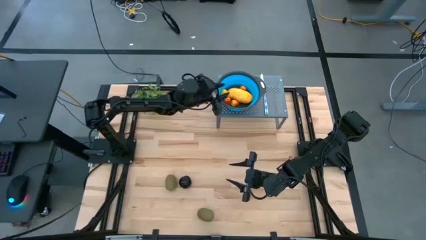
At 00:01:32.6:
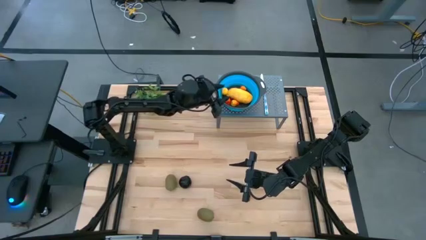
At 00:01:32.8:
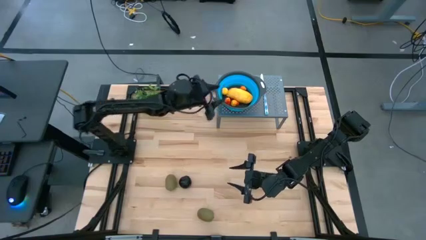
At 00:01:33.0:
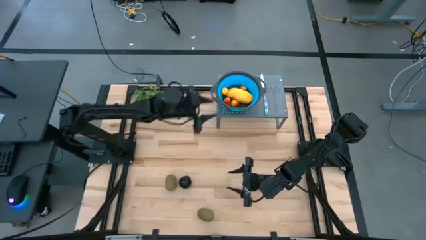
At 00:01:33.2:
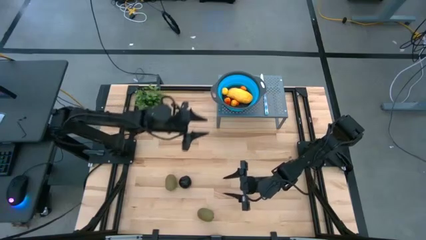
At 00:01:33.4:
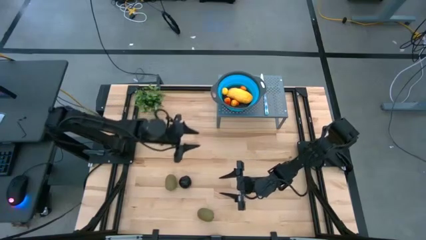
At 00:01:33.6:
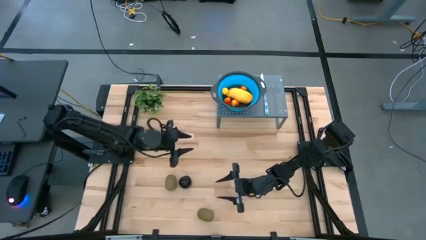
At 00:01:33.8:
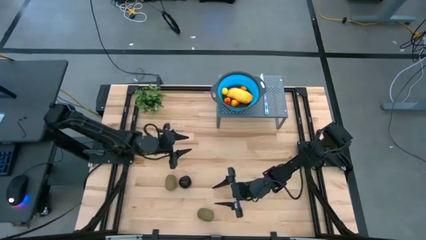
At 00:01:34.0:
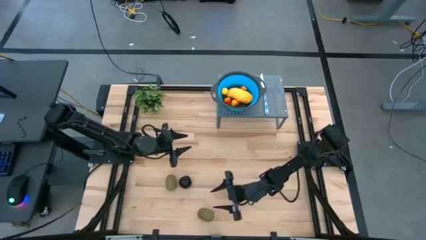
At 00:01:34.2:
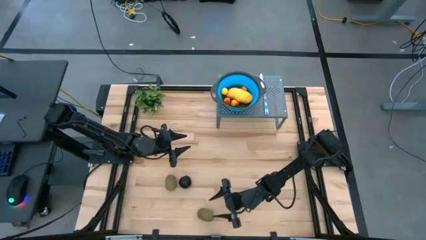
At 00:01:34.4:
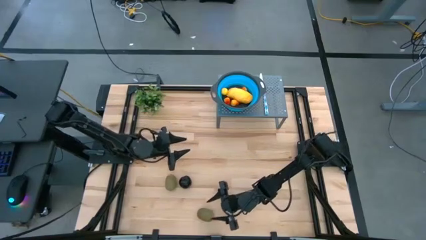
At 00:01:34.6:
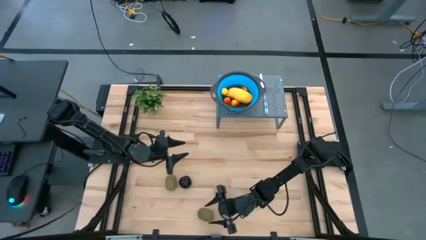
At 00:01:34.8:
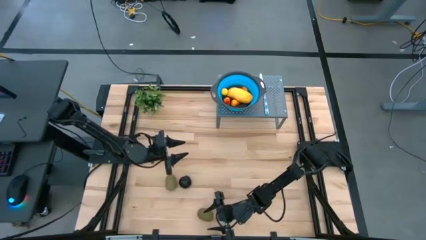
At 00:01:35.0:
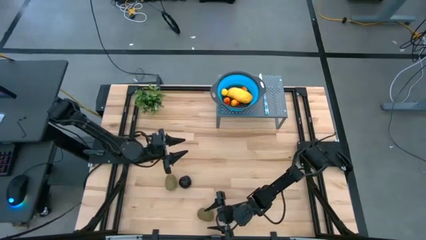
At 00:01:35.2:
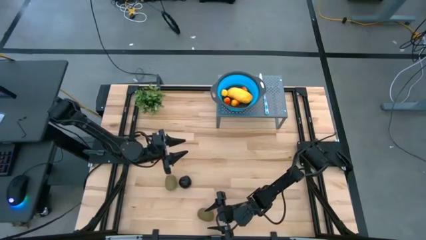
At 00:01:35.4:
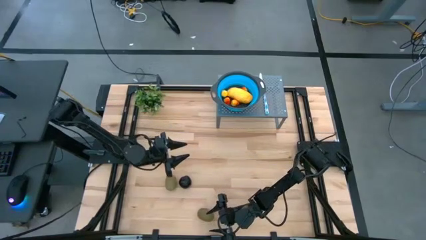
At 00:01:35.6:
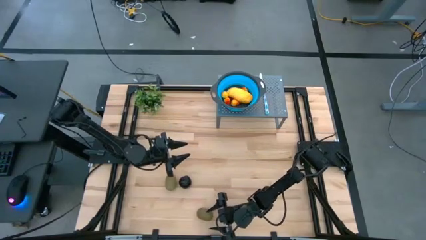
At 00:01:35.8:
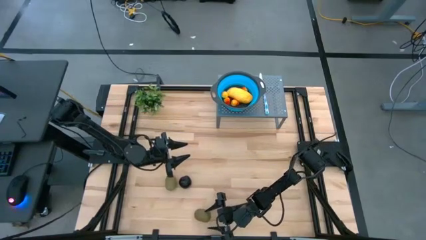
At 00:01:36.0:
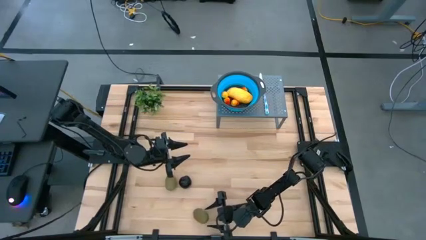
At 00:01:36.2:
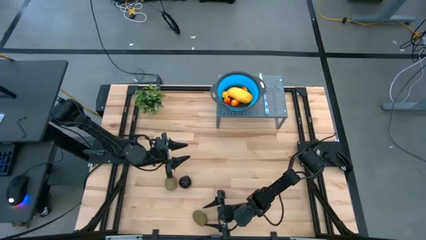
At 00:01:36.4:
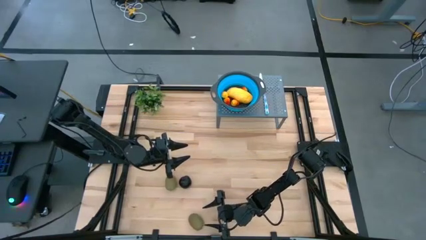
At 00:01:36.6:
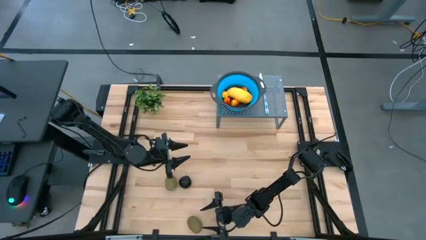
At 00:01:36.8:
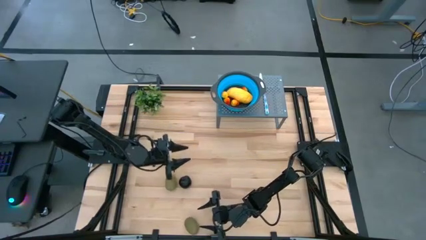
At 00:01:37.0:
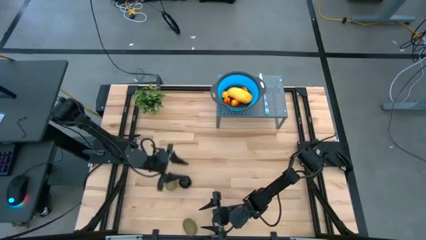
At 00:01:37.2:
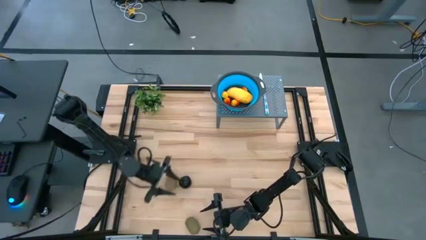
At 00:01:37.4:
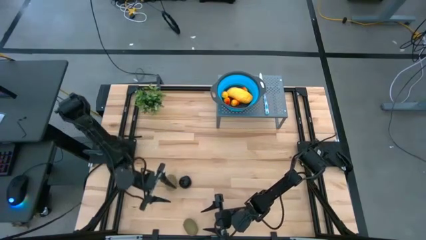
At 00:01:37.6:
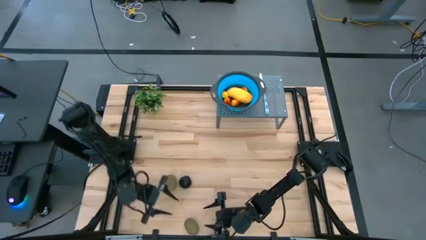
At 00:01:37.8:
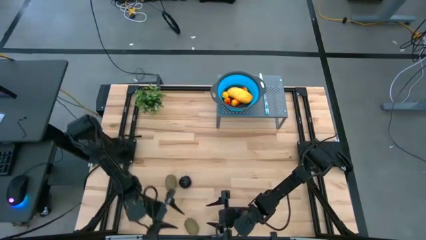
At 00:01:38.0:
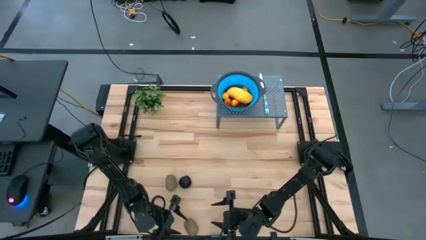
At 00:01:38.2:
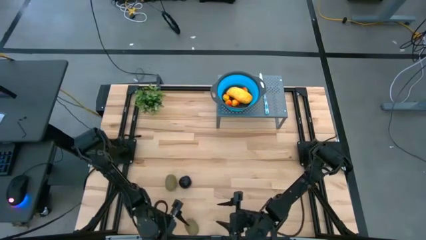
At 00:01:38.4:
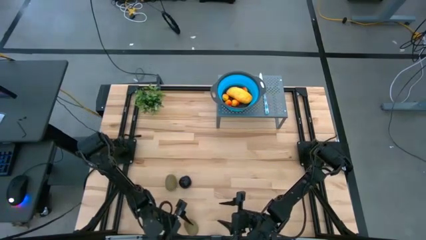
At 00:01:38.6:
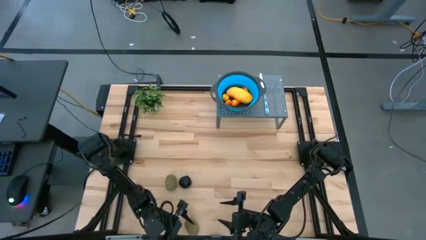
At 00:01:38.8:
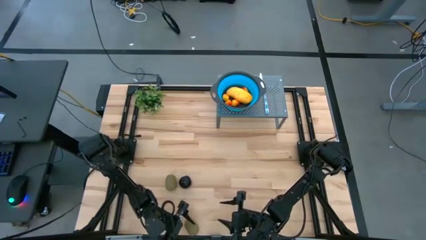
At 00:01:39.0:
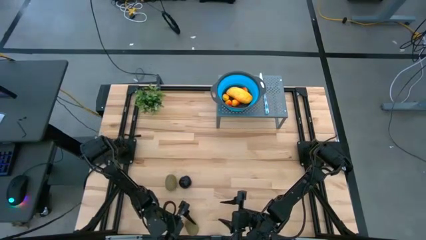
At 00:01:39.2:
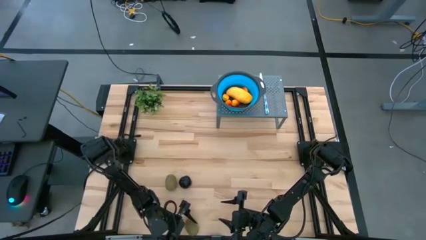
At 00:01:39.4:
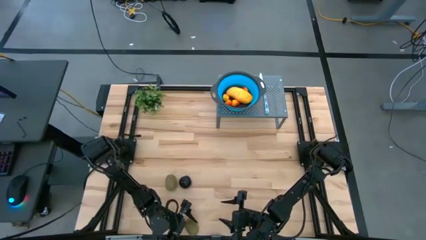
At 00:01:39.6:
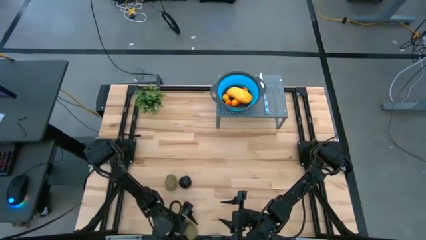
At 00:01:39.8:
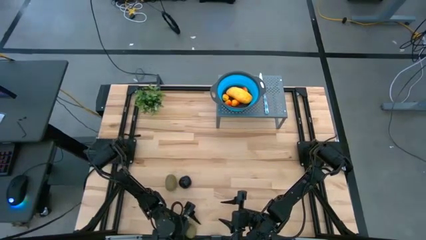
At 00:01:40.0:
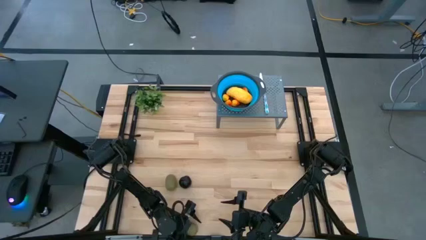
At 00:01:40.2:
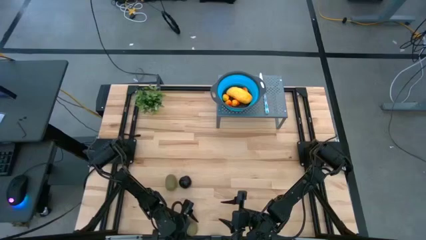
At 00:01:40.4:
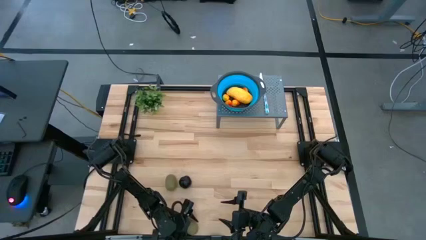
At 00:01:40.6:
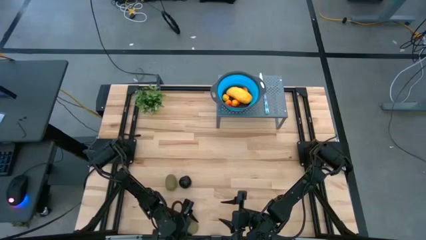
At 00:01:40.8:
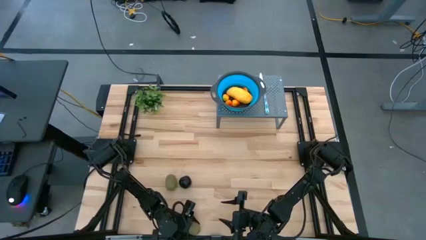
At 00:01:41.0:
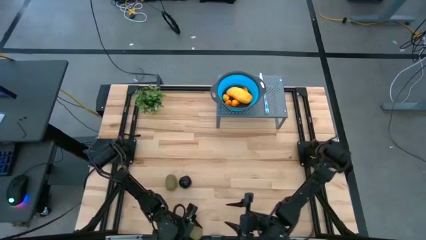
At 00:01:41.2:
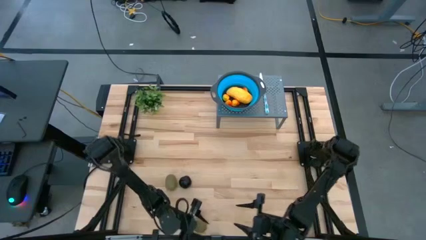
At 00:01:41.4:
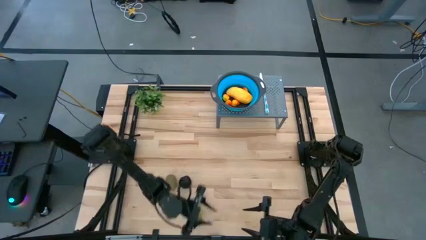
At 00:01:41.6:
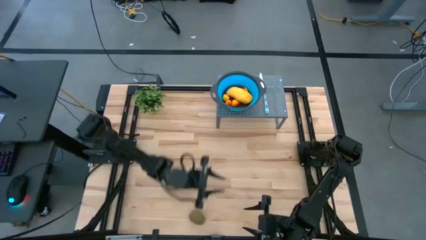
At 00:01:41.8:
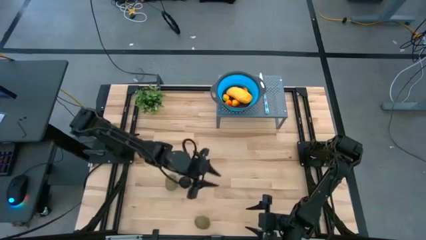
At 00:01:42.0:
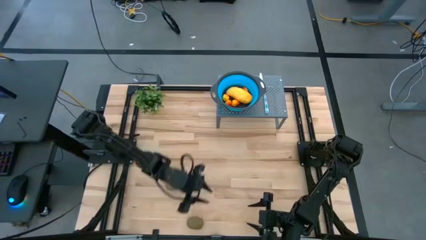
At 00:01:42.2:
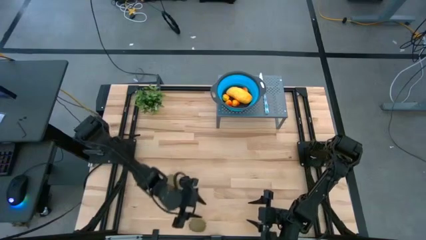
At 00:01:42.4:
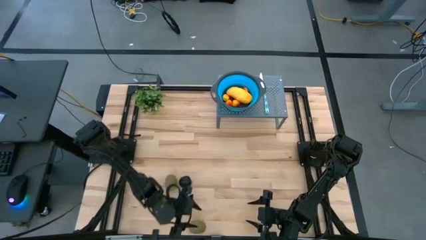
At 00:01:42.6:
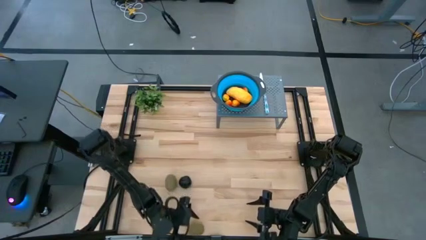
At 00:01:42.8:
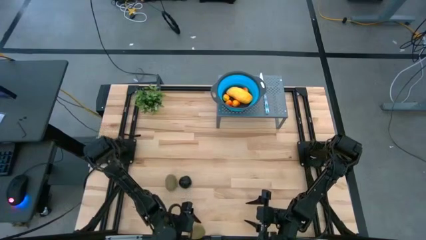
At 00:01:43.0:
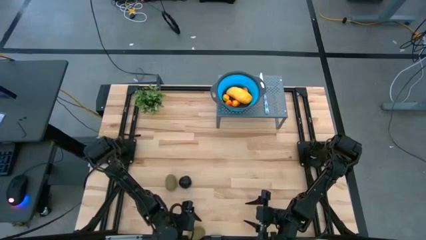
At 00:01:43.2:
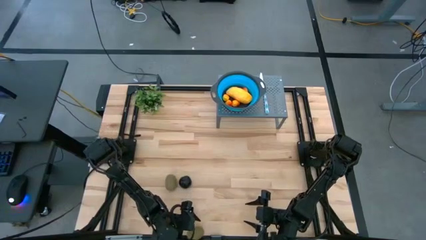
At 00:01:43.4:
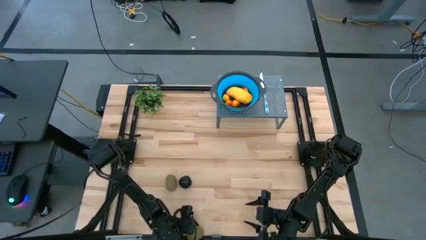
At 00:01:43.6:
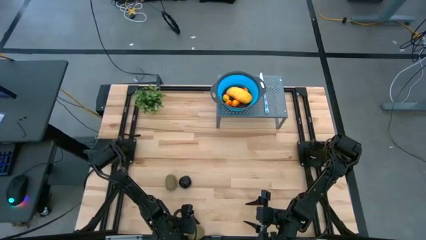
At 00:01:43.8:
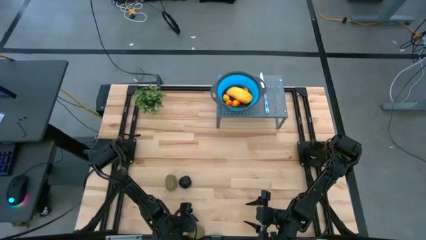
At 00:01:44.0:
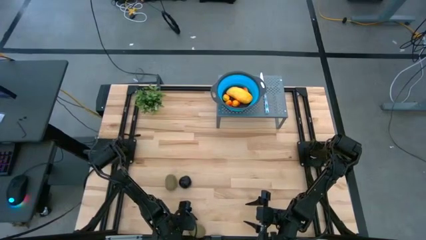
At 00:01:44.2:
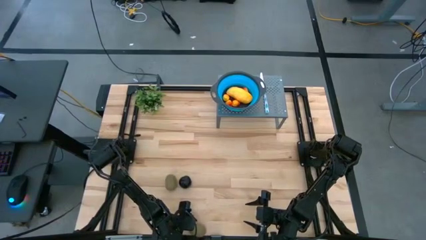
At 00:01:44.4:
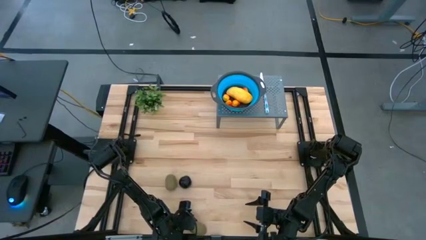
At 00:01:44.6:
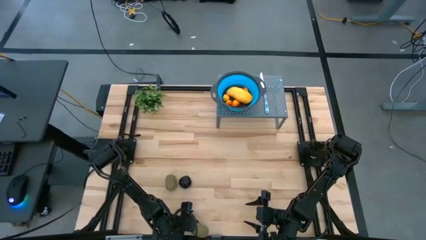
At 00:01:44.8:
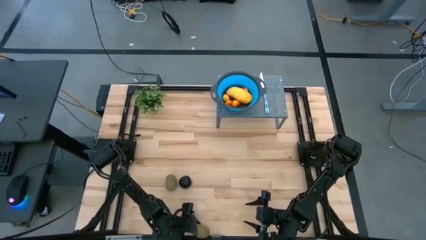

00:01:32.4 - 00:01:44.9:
Task: Pick & Place Fruit
Put the brown kiwi into the blue strainer bowl

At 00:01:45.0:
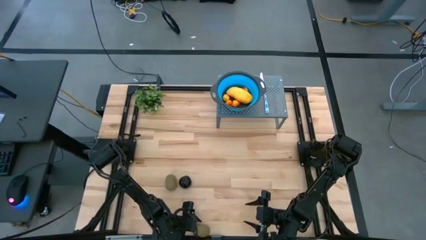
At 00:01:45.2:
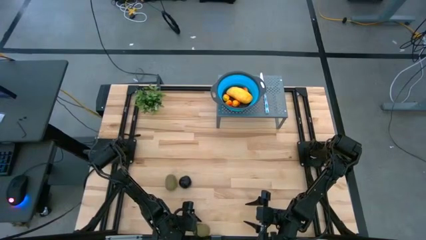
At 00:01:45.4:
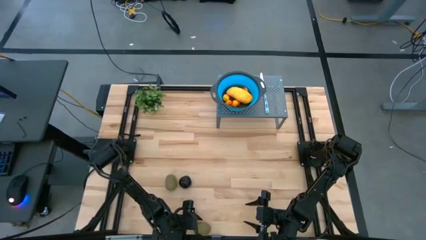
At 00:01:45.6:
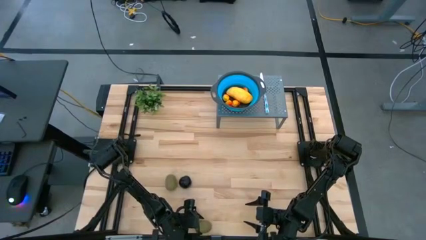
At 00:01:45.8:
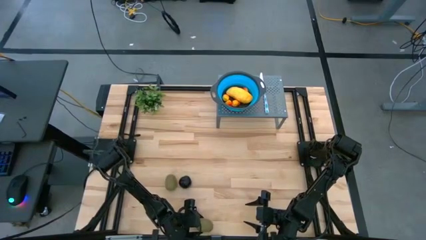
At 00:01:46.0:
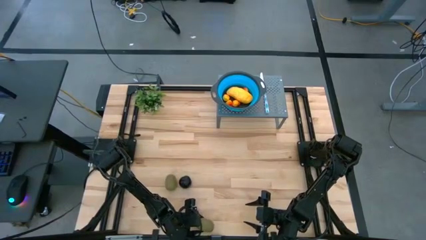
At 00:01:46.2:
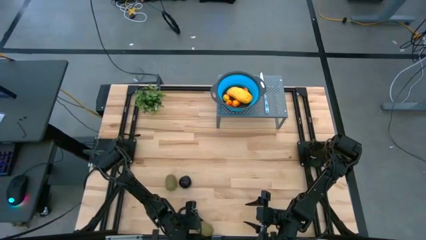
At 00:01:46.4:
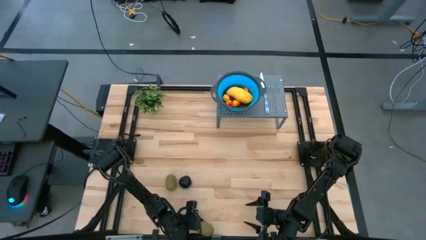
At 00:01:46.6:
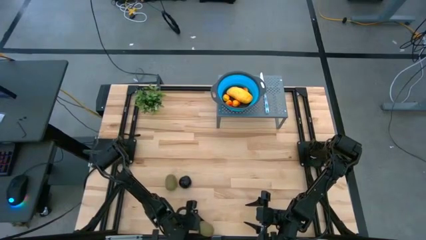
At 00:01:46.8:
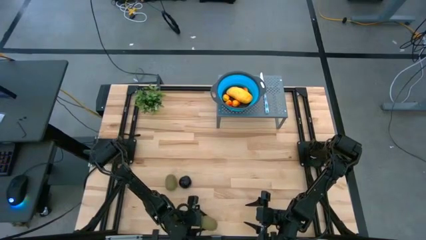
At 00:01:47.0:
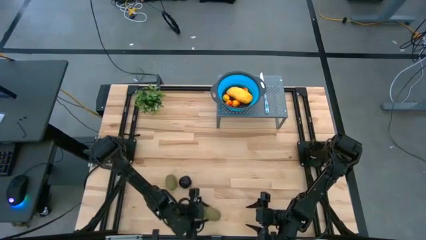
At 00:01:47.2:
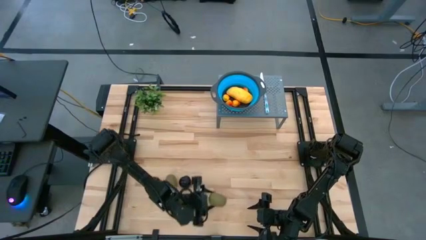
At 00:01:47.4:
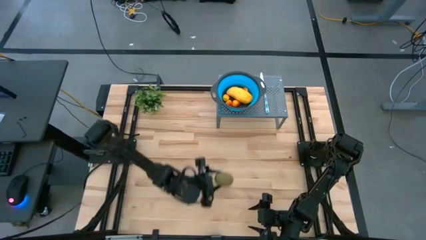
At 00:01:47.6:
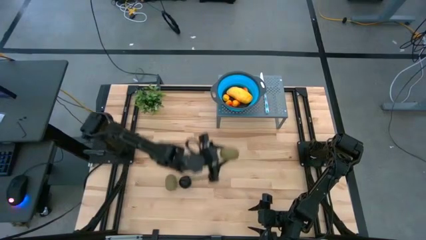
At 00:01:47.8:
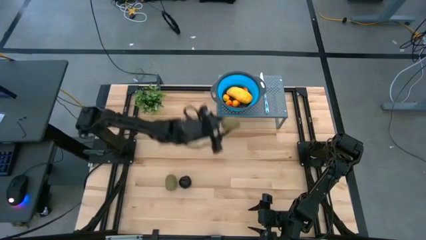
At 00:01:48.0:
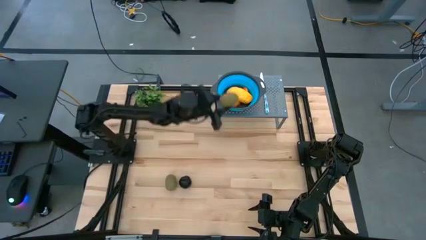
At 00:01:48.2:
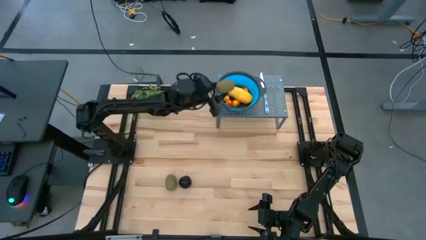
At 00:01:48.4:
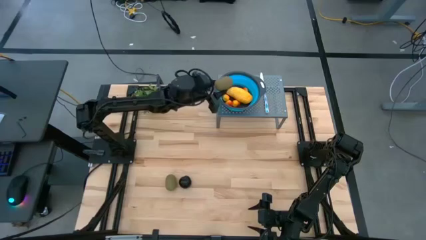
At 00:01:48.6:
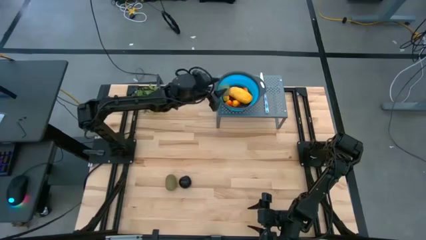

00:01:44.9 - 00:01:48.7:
Put the brown kiwi into the blue strainer bowl
